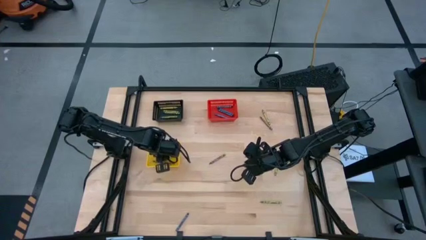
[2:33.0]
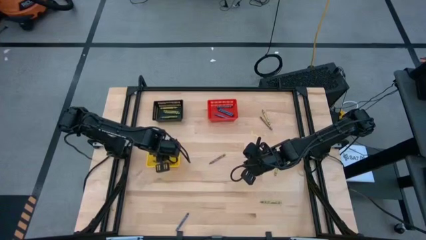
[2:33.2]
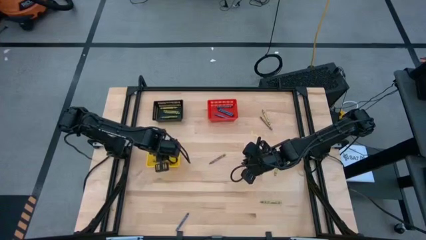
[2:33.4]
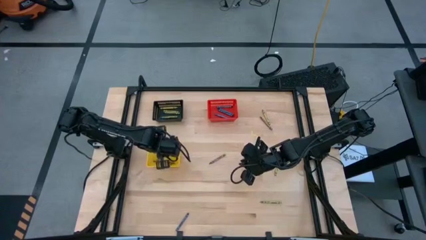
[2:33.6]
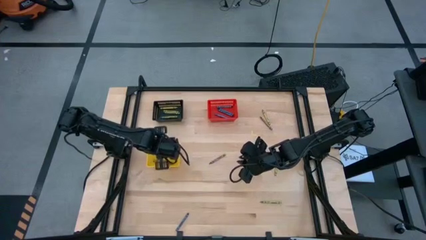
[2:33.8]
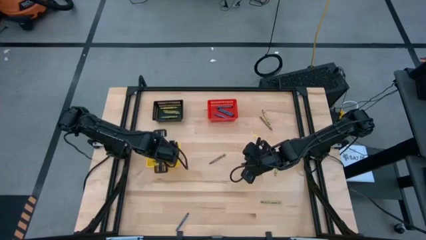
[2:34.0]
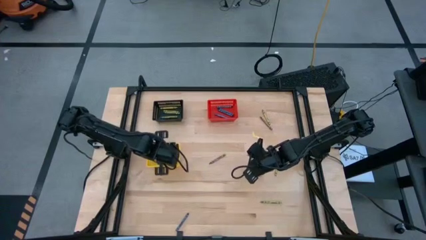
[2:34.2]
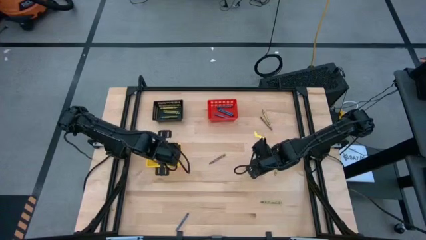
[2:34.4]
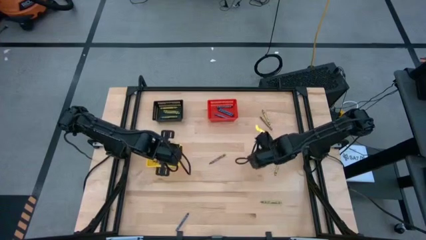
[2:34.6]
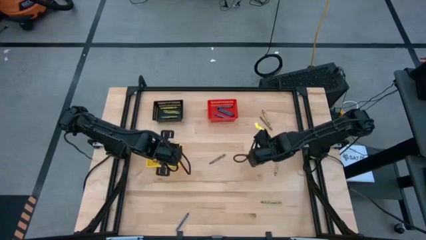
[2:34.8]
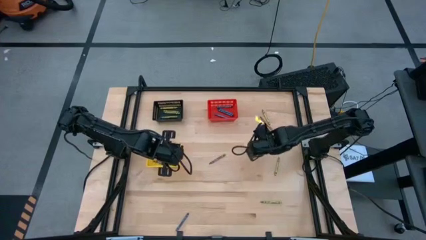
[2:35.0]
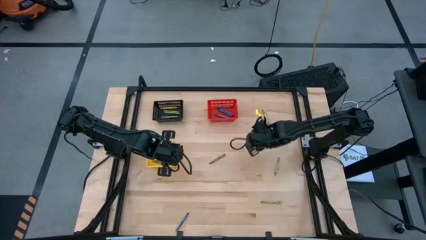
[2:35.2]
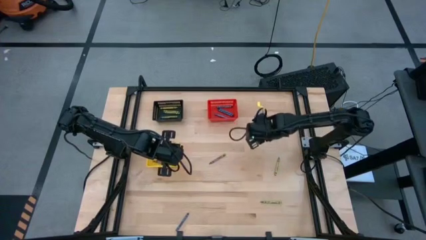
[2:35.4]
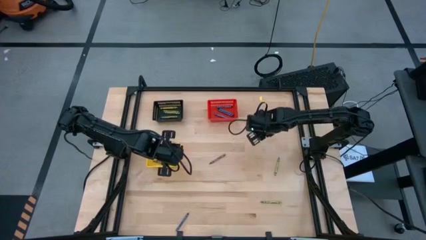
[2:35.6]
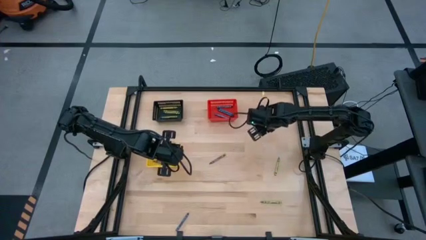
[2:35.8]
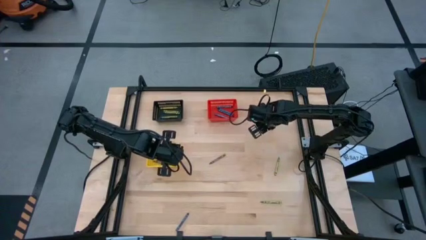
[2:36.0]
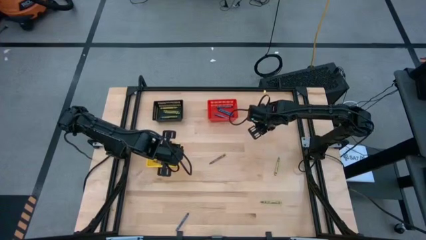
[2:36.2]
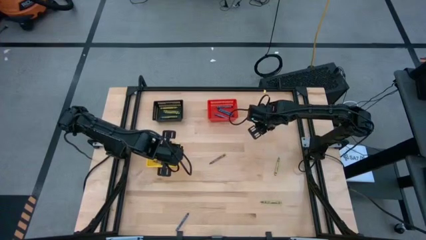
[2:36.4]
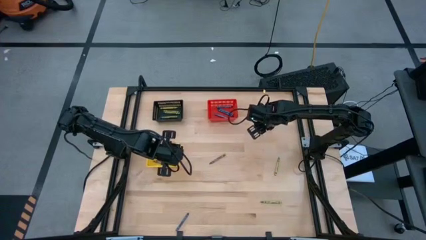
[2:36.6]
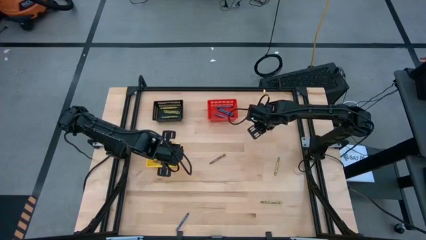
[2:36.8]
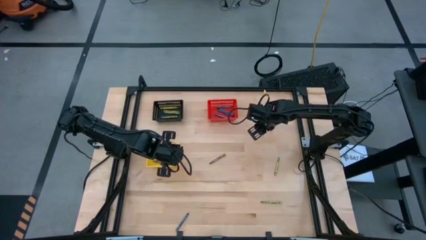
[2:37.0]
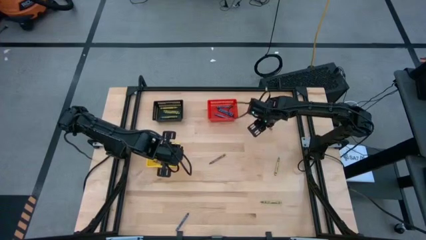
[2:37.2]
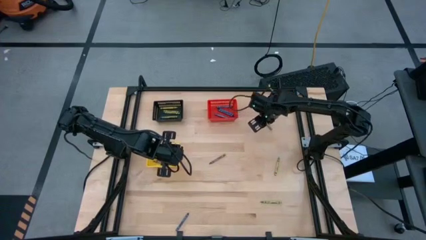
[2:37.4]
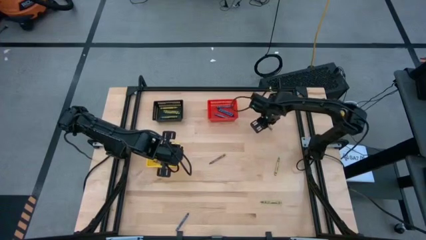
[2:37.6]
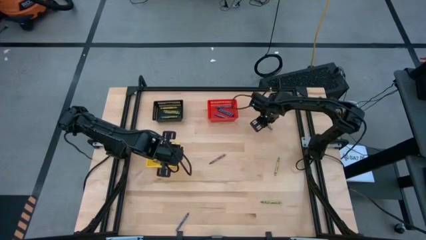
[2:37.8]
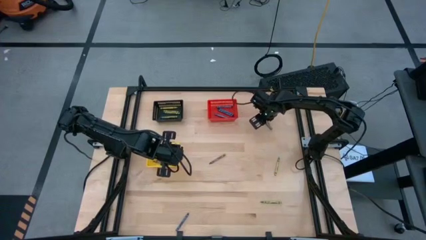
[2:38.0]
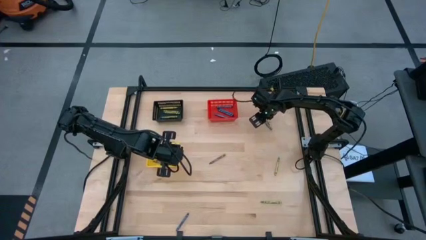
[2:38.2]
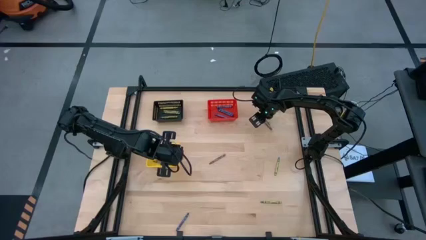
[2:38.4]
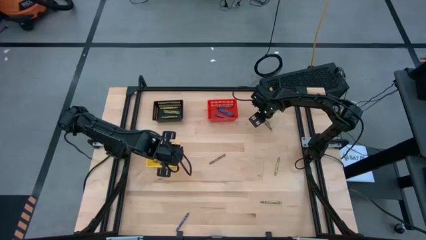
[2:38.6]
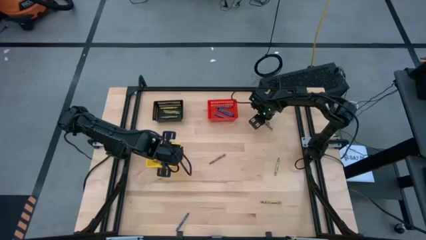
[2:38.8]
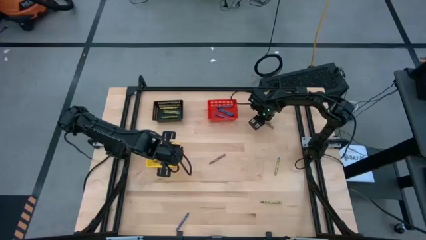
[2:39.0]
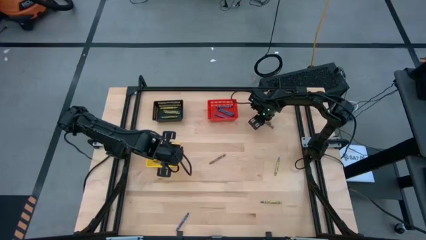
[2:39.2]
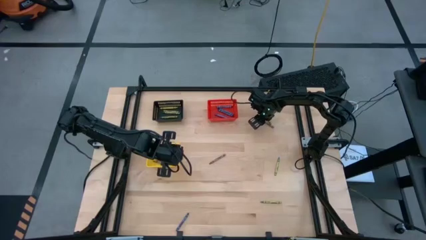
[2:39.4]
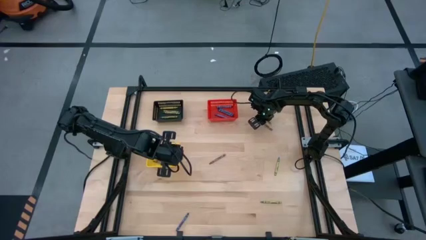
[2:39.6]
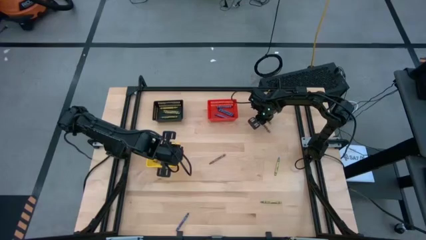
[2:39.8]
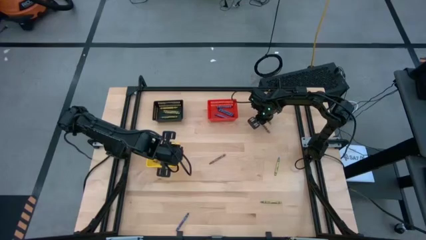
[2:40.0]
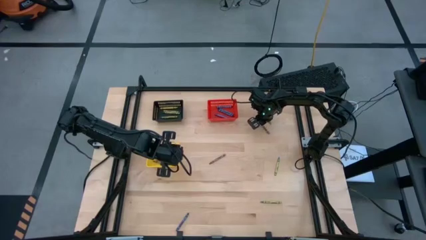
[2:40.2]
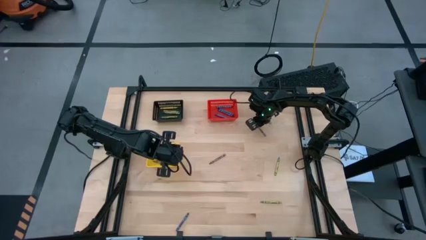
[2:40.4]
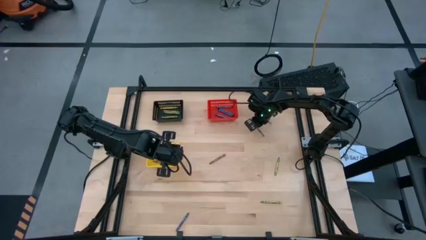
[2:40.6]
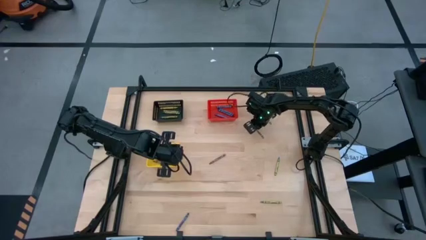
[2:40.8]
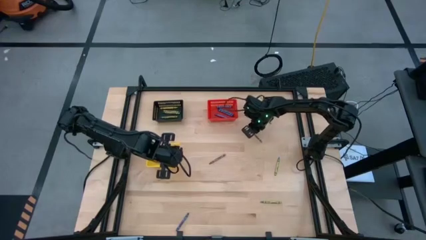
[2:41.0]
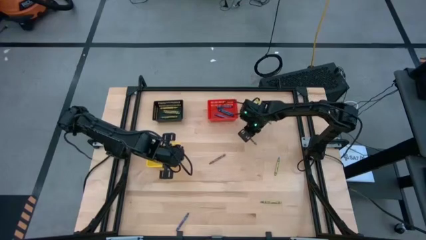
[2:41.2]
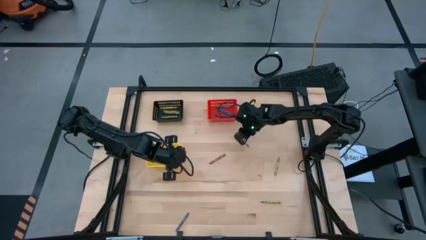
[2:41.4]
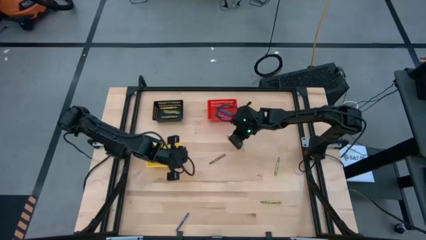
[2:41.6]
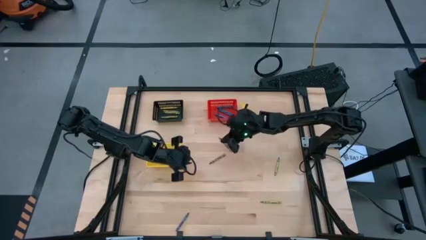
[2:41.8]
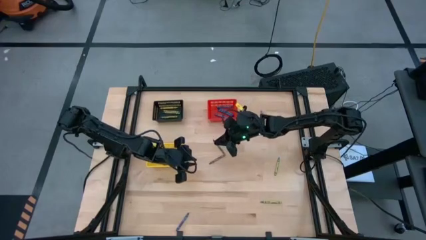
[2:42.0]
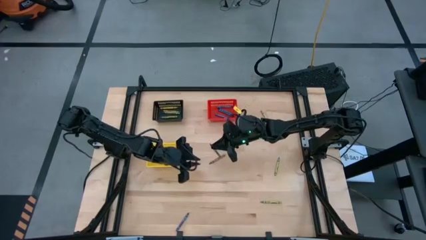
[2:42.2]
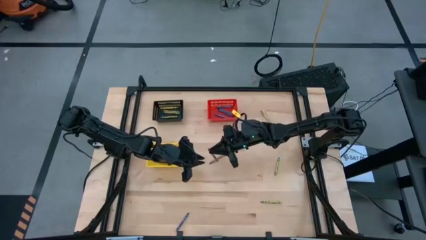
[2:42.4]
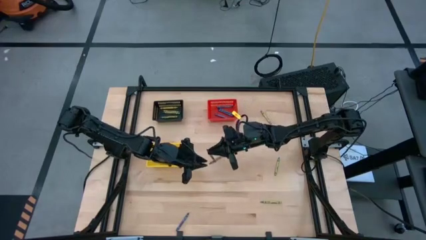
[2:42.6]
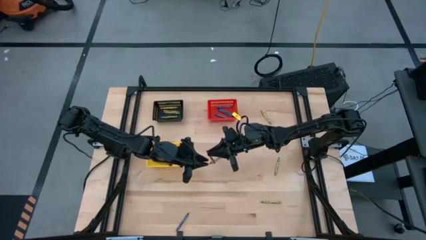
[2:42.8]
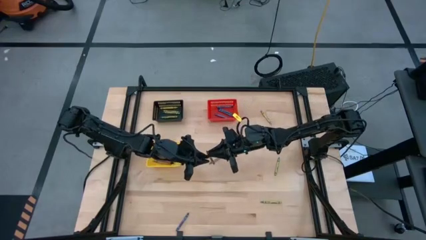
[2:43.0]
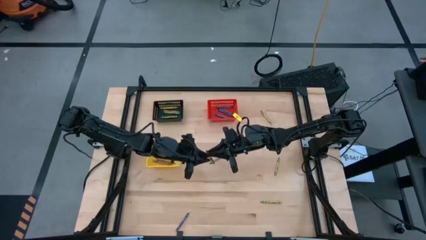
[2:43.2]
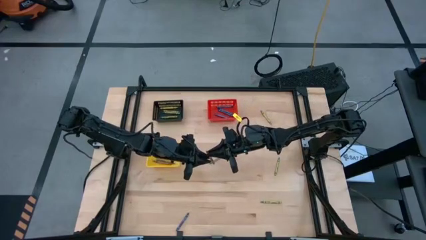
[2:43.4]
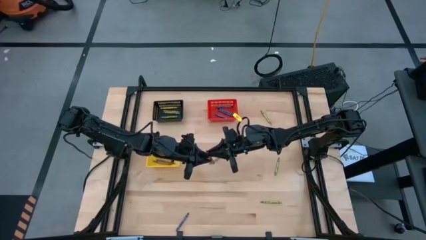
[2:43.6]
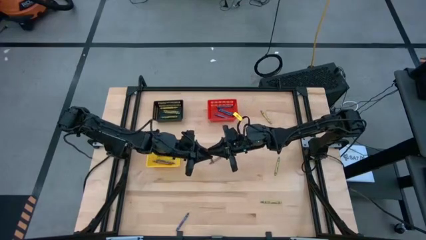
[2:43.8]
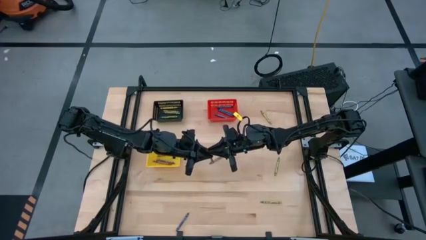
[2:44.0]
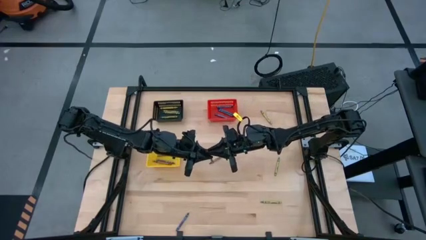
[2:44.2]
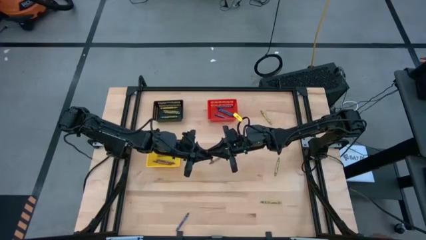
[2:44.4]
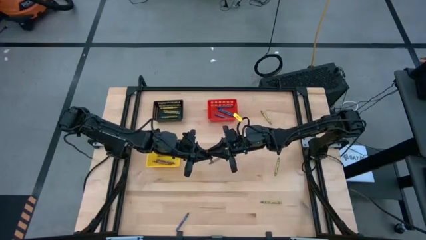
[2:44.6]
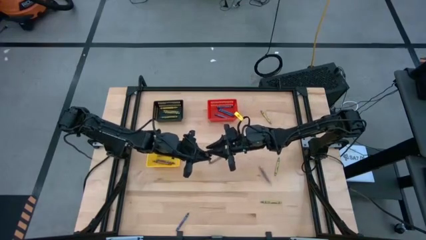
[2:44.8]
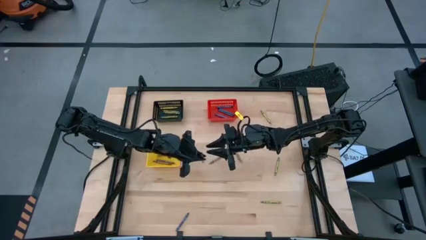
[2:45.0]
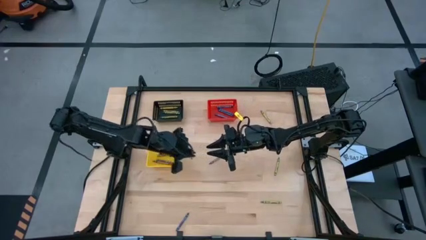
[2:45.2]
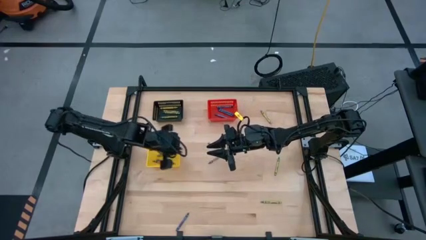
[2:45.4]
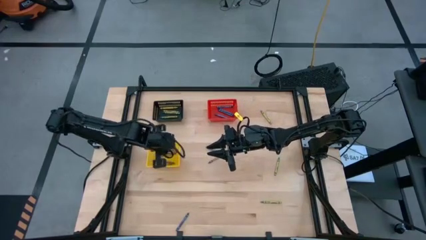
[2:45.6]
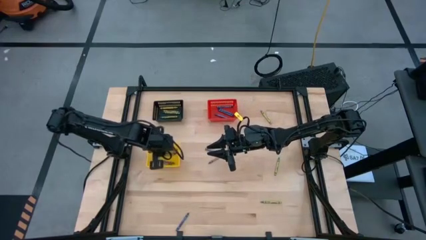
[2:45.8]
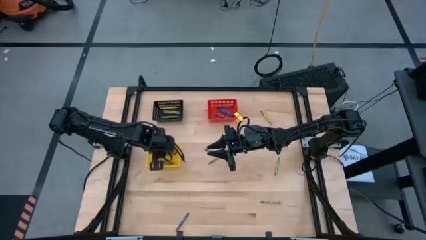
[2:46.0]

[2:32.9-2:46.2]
Task: Sort crayons
Put the brown crayon into the yellow basket

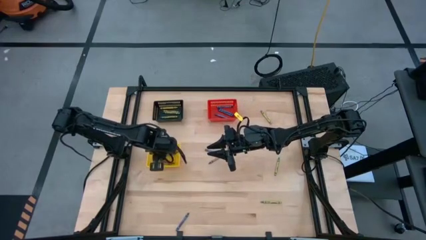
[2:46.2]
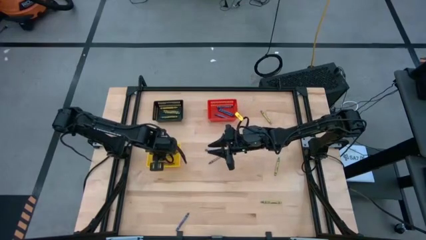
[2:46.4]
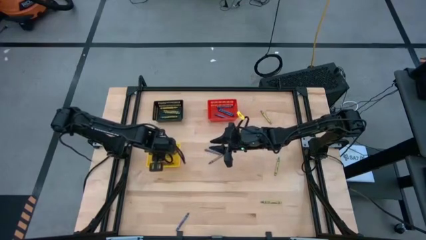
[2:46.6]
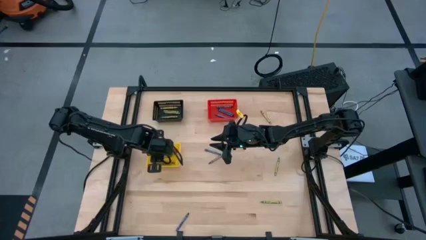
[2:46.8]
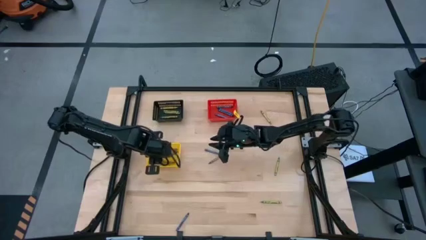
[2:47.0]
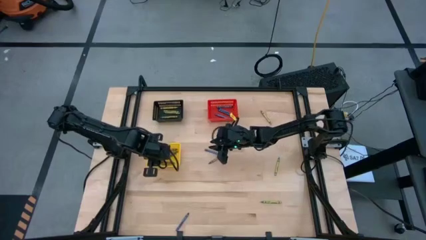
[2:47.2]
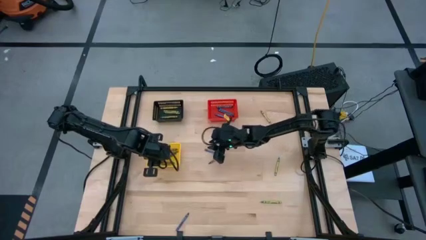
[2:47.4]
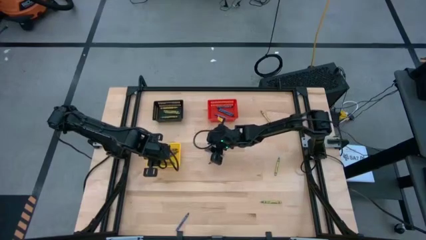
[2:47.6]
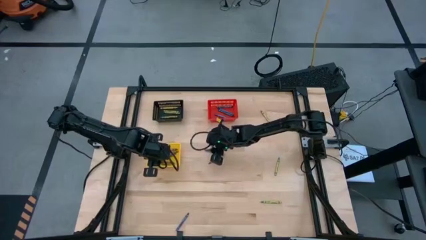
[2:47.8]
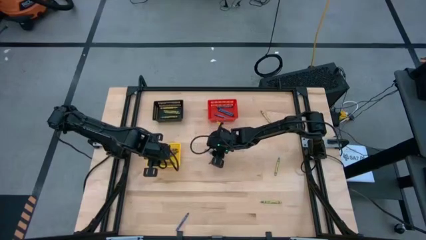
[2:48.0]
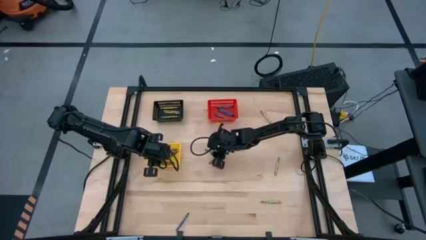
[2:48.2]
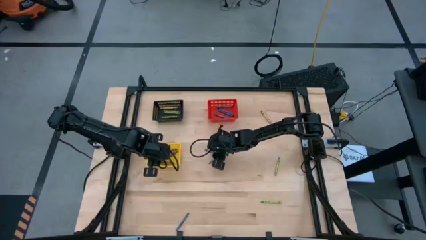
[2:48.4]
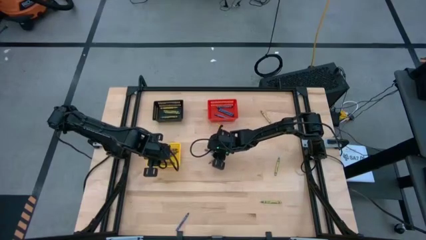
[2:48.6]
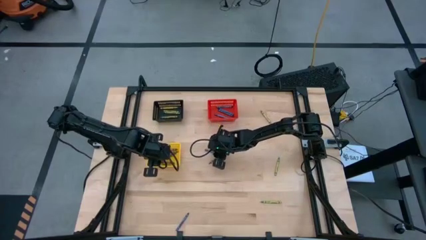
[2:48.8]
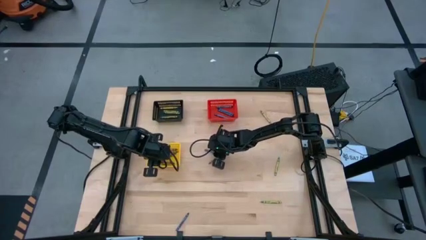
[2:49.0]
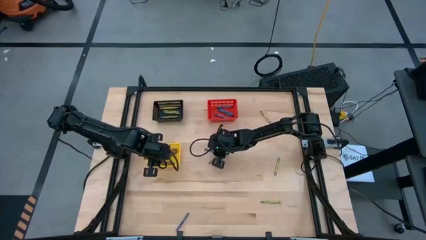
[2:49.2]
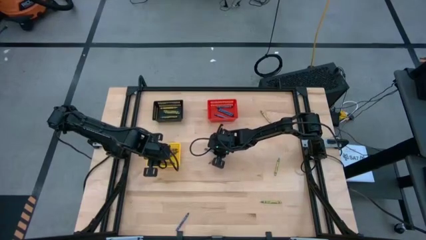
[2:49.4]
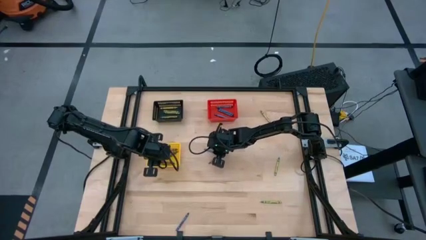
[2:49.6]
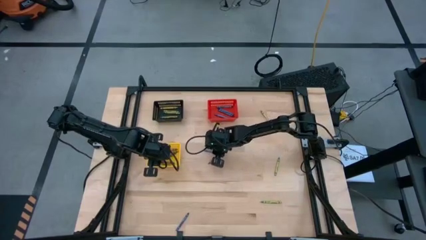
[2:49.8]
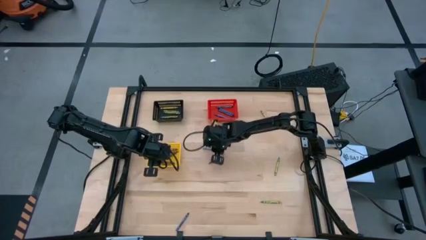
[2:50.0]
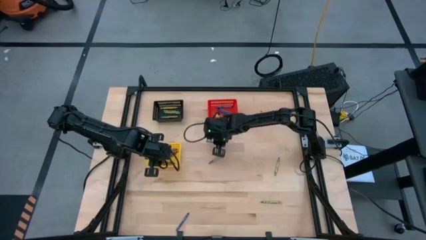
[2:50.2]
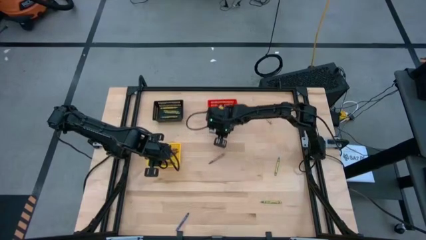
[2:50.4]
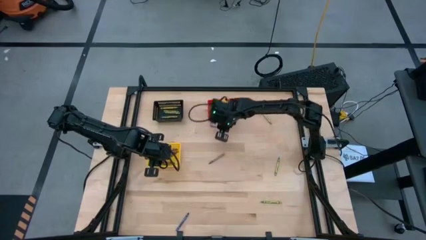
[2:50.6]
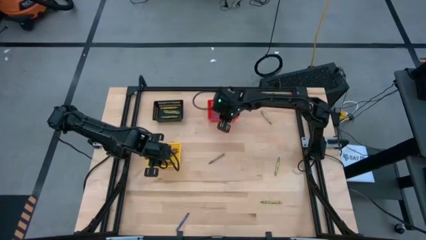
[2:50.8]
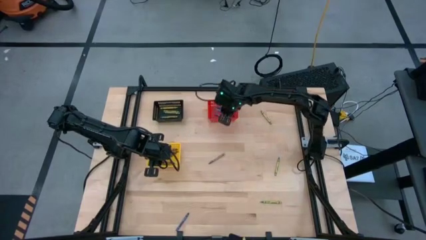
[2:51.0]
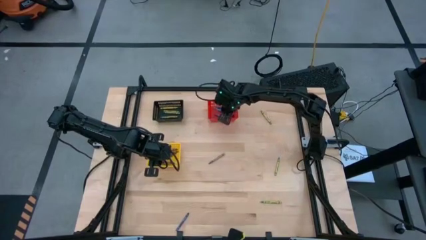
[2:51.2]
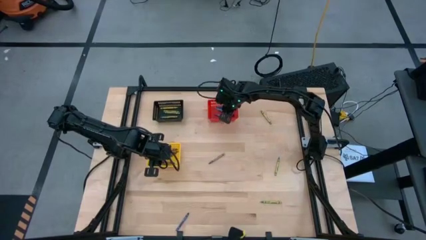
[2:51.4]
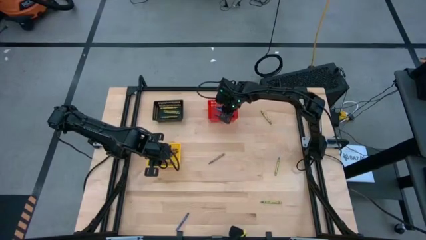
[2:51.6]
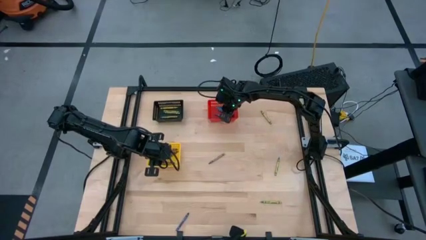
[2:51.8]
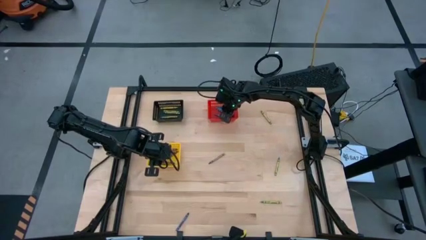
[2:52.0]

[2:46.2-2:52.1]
Put the blue crayon into the red basket
